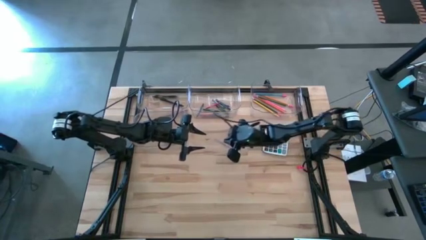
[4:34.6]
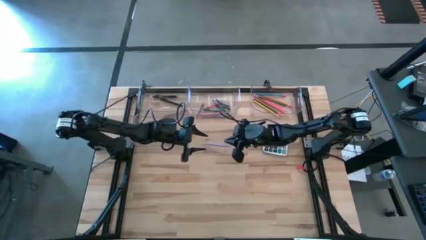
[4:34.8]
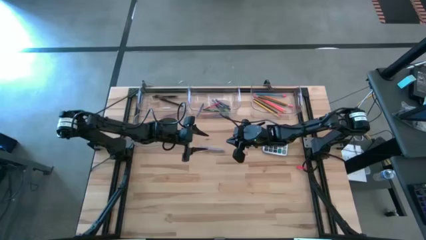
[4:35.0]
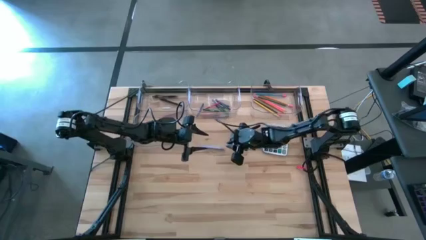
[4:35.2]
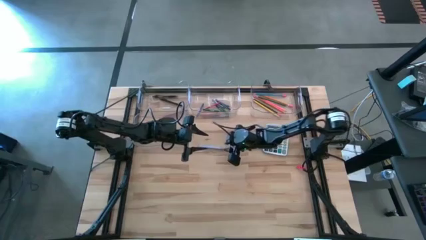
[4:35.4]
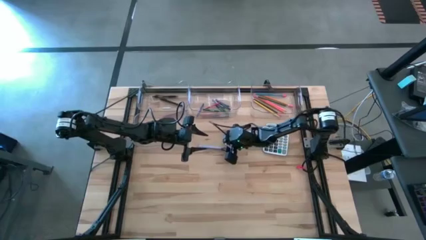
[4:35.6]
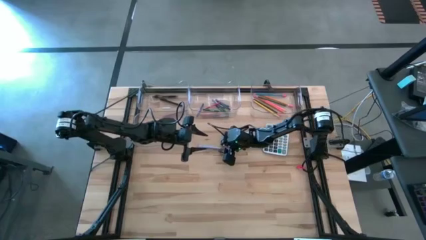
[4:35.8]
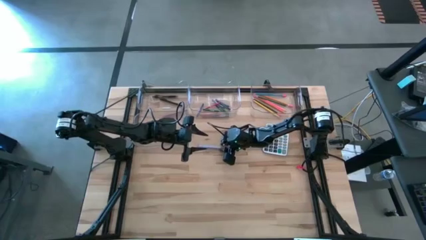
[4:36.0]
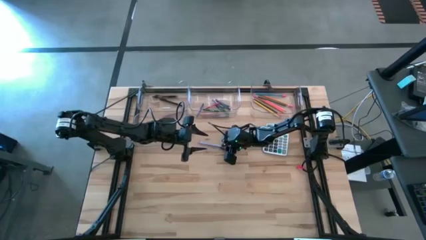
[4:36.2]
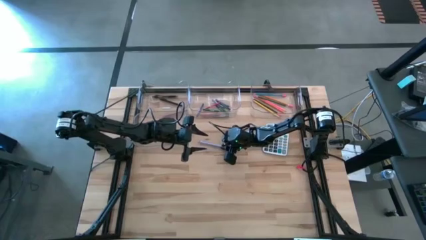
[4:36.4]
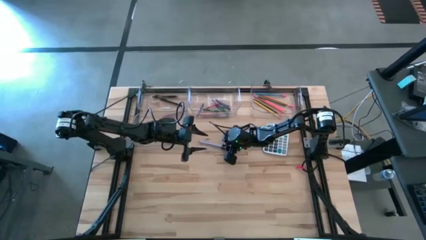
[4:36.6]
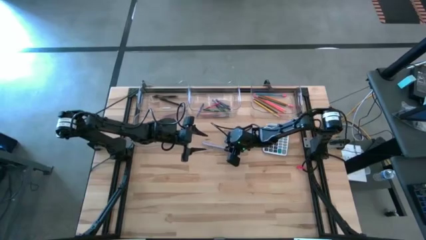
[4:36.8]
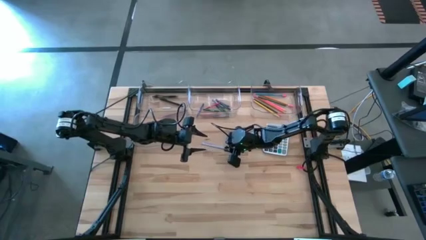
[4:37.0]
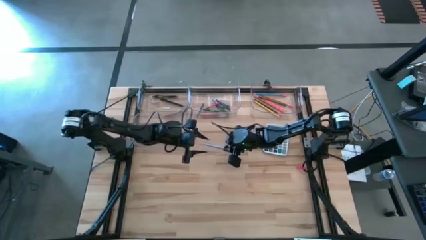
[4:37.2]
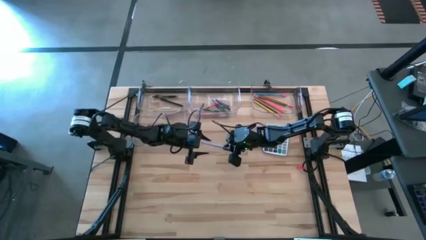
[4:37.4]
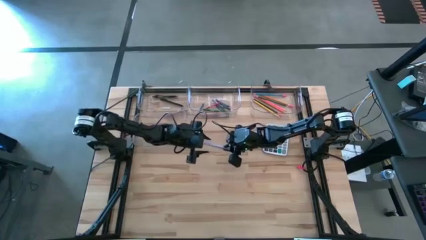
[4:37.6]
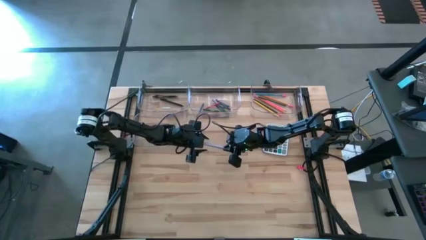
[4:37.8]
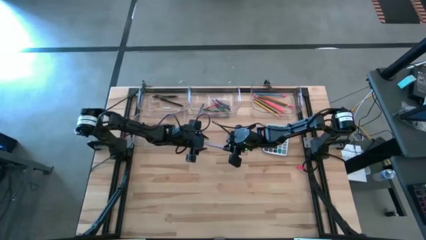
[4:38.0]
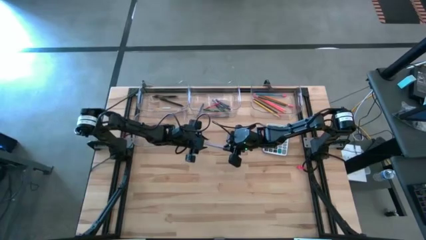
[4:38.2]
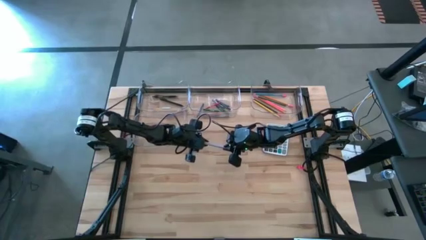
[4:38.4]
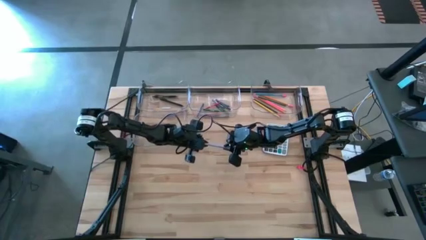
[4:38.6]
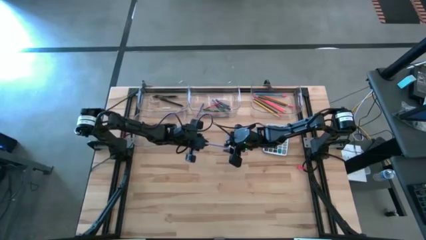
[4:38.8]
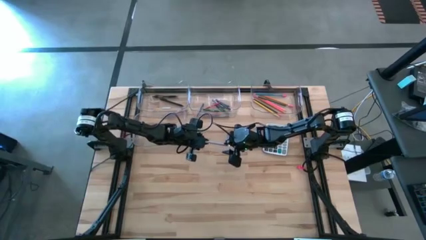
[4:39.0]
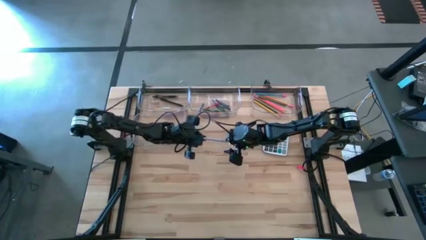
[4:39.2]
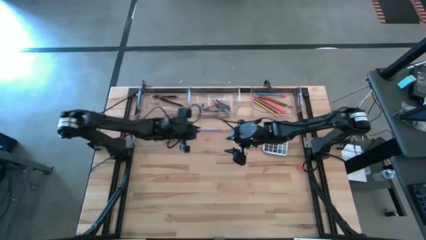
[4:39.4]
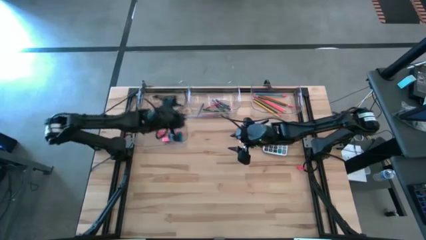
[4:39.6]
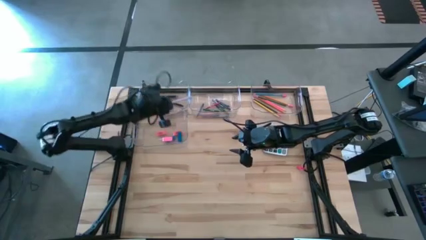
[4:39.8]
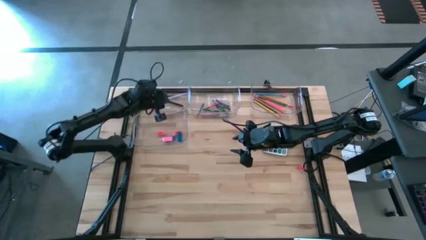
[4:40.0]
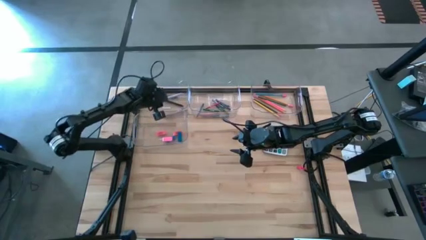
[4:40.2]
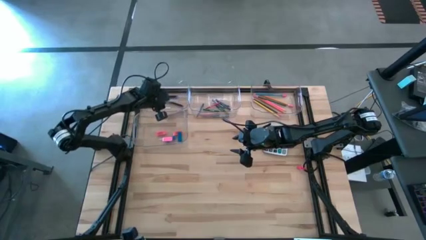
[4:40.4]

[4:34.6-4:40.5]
Task: Sort crayons/erasers/pens/pencils in bins
Put the light blue ballpen into the top left transparent bin

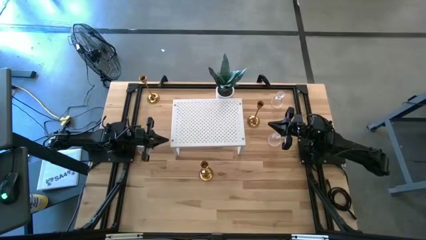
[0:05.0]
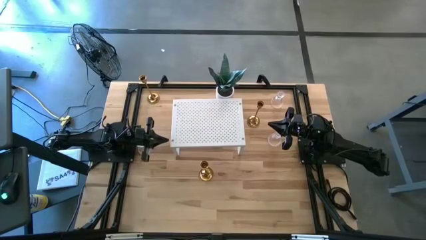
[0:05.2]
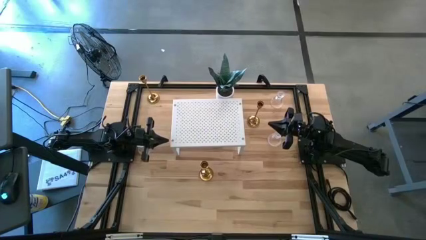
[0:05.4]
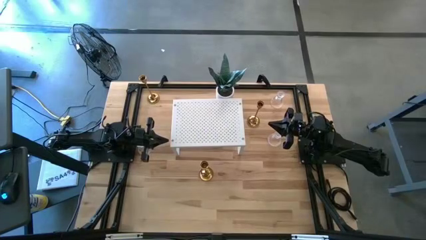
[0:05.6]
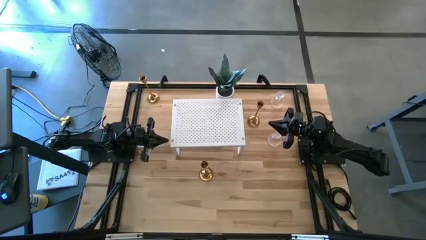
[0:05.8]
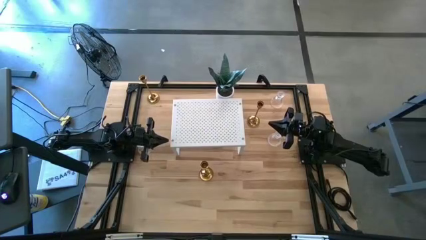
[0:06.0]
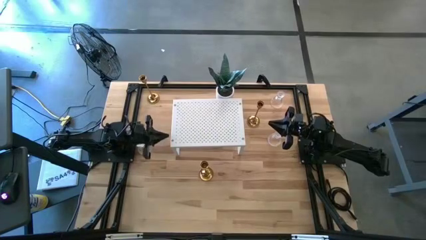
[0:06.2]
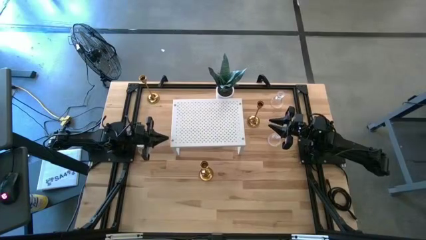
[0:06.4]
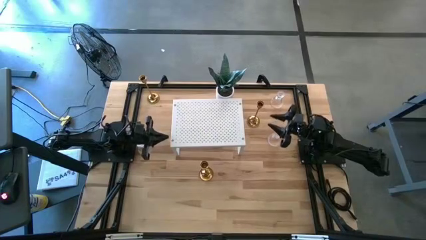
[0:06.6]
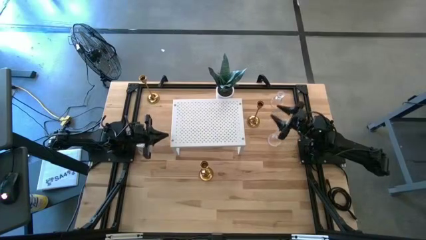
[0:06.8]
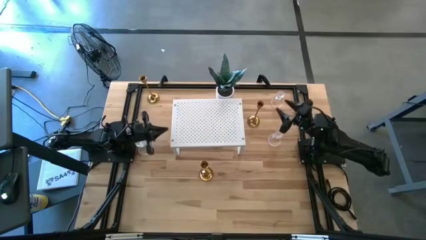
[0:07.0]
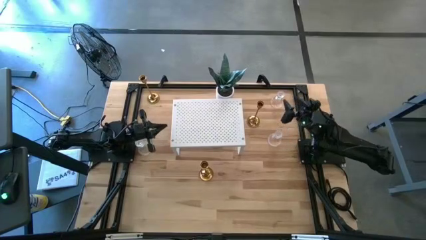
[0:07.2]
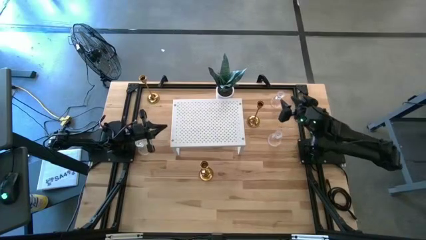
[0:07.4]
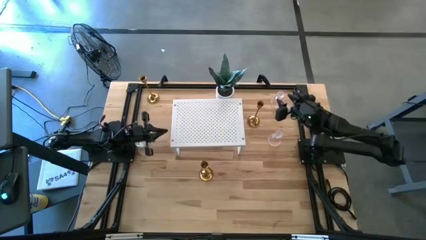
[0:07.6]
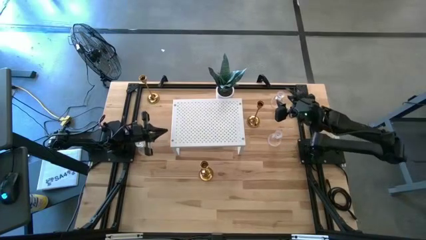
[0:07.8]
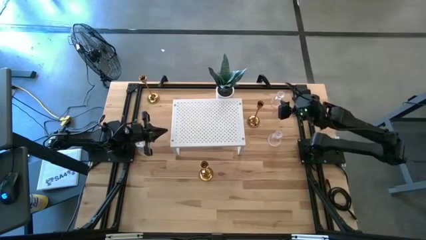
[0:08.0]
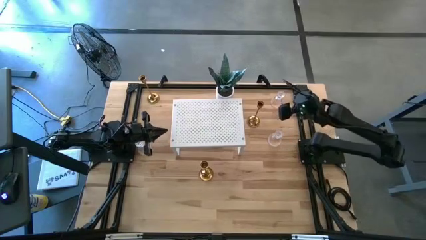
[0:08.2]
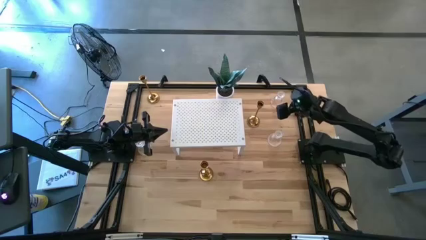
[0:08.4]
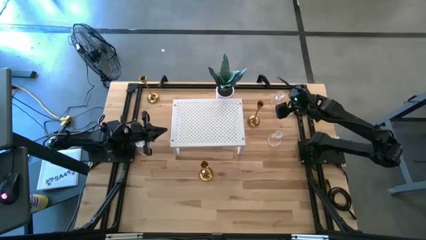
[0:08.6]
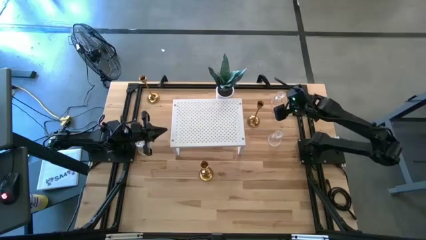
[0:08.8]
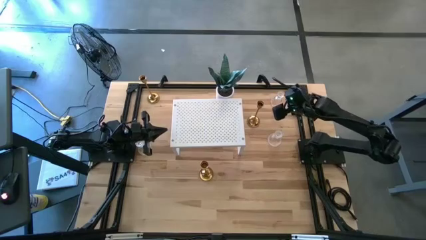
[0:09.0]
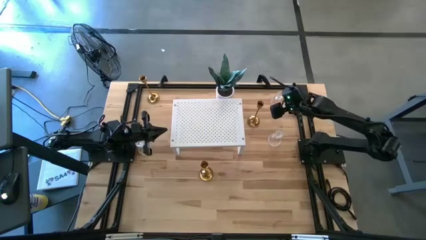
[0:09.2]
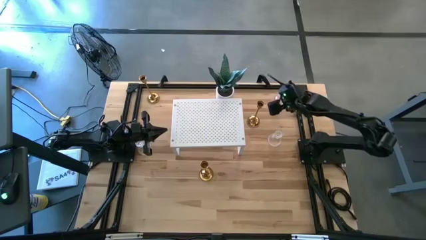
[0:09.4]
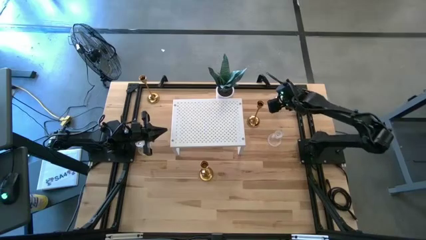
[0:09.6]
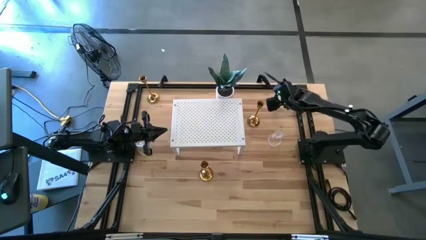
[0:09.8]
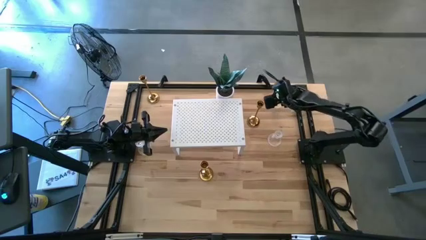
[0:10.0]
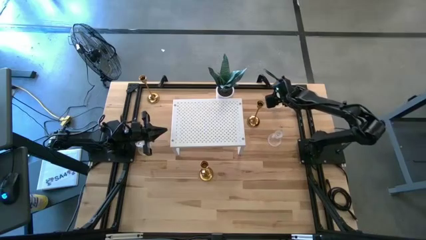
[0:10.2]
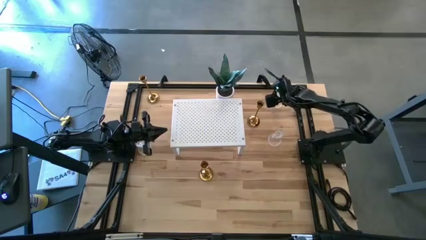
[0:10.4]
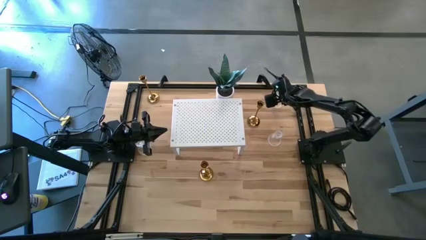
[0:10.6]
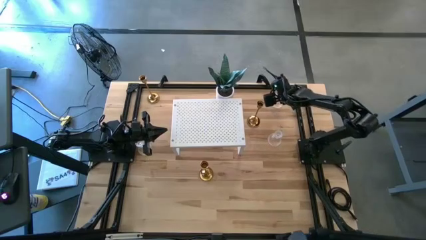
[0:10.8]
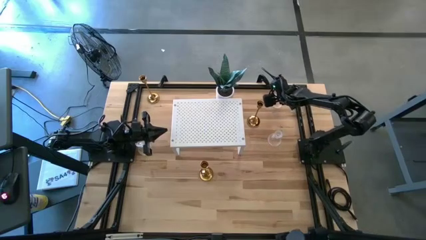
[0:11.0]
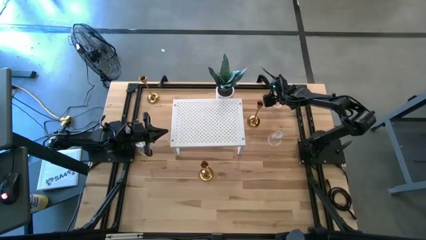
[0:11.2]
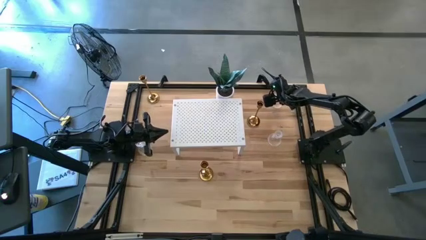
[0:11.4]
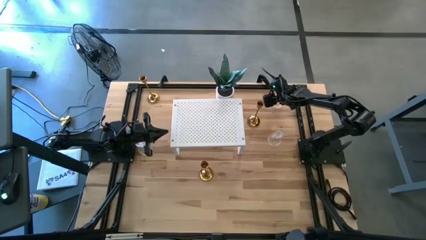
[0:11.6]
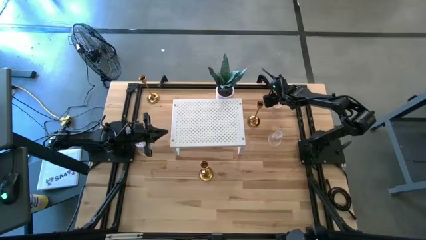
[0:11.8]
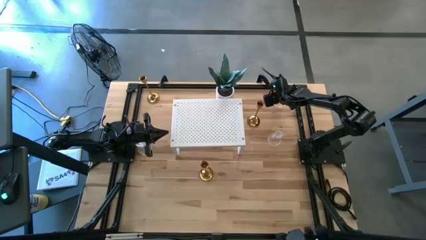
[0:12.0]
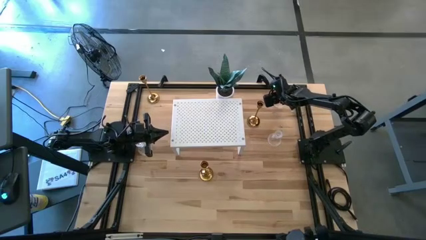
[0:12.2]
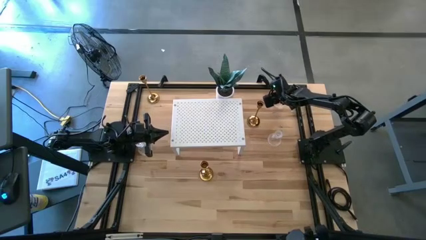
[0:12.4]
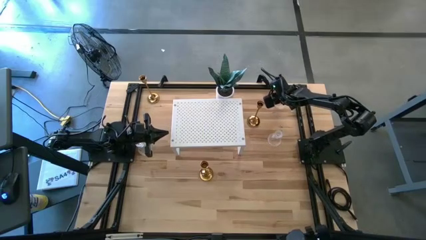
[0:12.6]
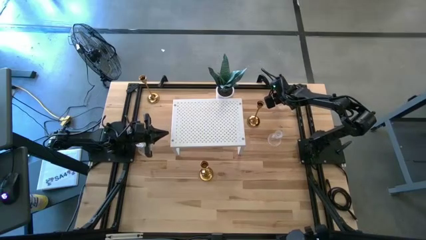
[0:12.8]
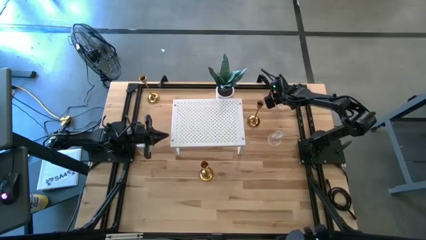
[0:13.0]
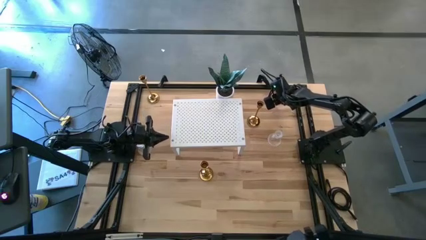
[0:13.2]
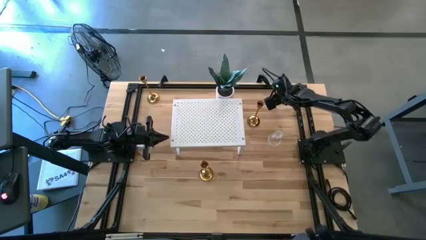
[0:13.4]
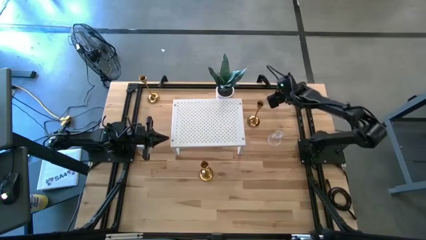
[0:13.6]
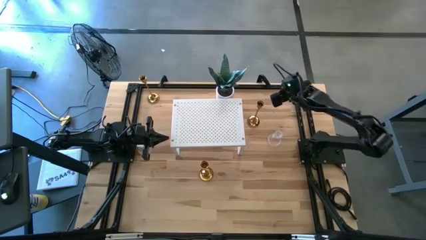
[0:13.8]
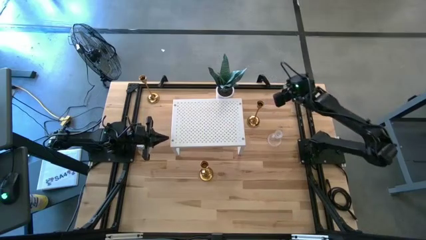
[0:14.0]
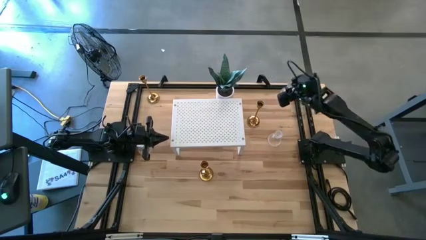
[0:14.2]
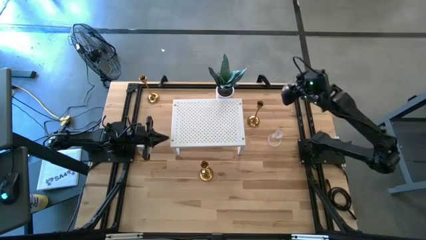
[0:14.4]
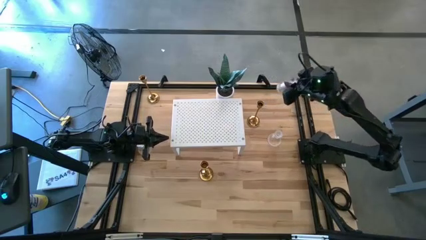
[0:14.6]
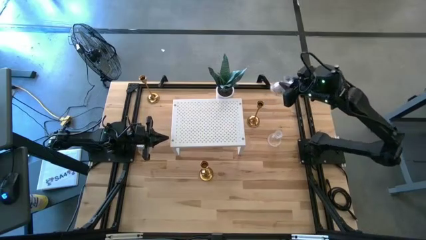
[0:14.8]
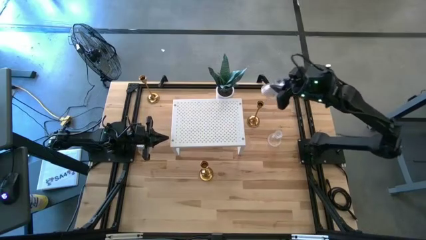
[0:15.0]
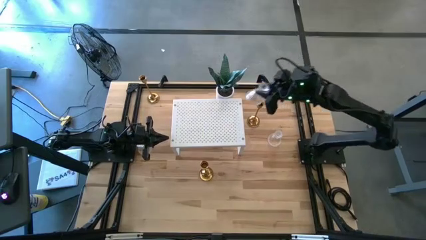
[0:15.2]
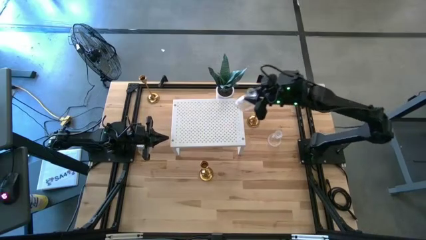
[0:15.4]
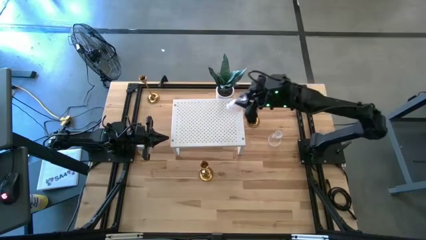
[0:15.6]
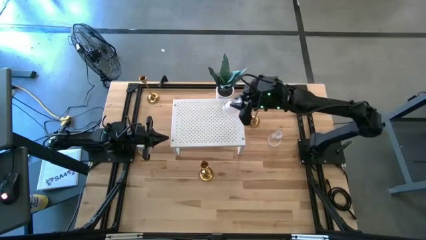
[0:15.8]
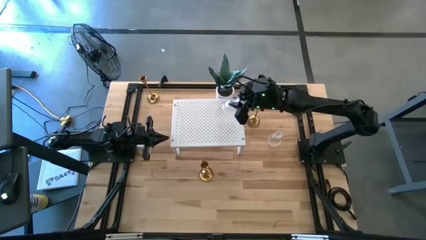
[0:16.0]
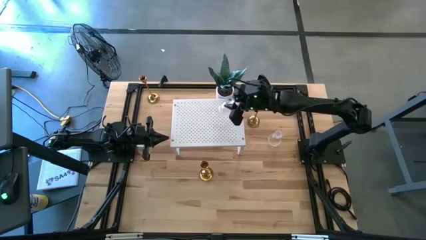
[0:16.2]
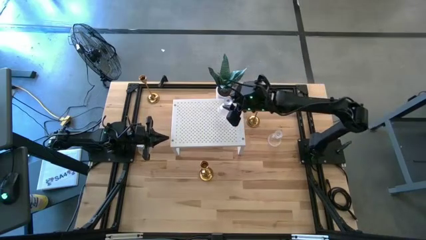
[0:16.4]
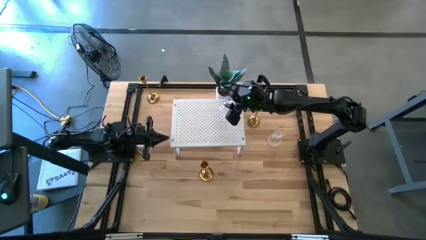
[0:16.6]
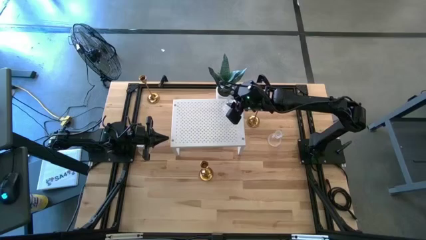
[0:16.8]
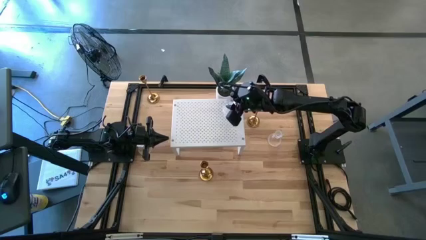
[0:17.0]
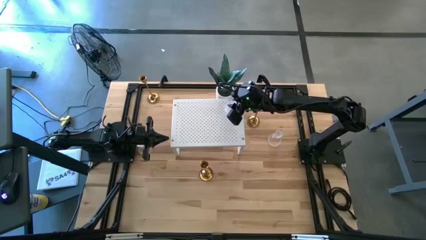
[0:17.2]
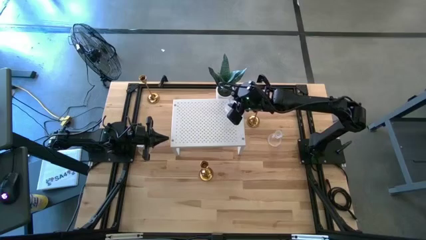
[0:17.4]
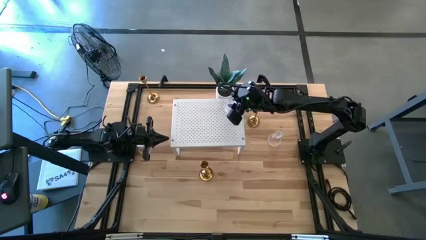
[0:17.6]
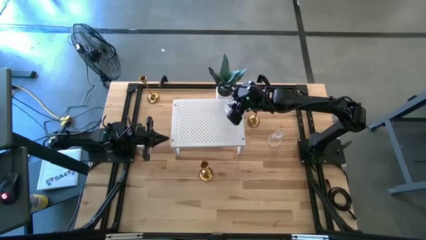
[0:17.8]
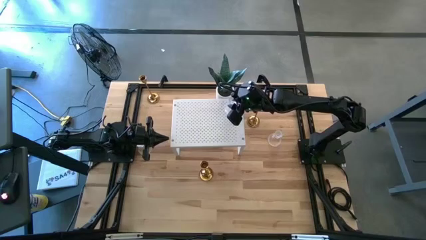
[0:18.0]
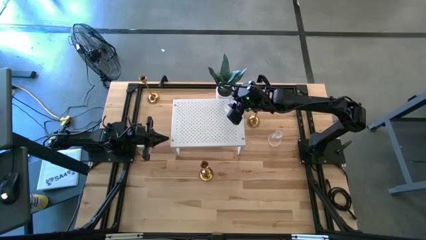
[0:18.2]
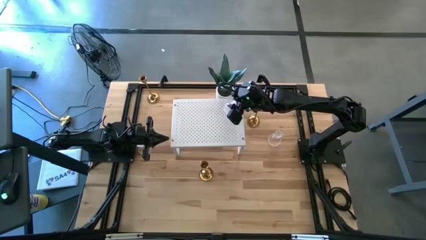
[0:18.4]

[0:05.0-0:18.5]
Task: Pick & Place candle stick holders
Put the top right transparent candle holder on the shelf
